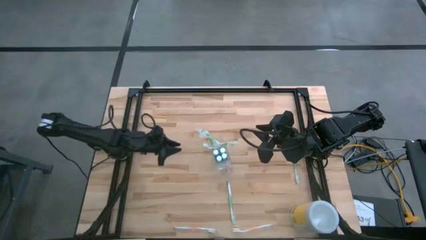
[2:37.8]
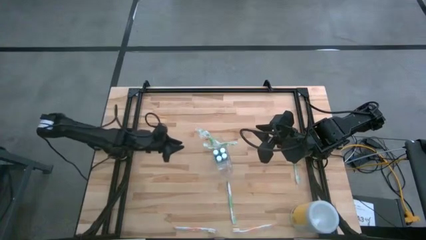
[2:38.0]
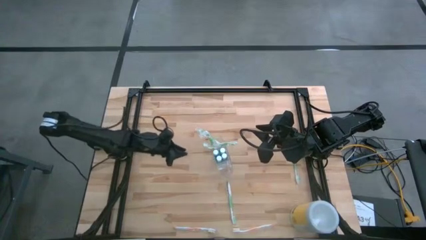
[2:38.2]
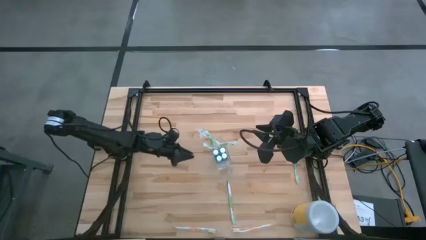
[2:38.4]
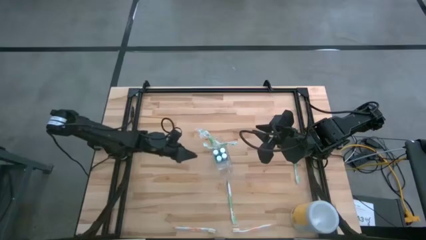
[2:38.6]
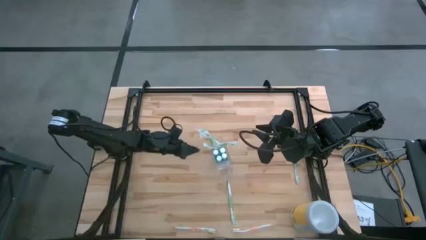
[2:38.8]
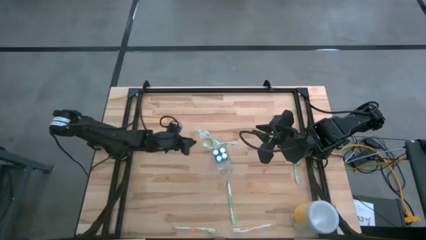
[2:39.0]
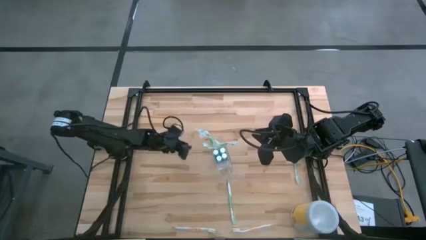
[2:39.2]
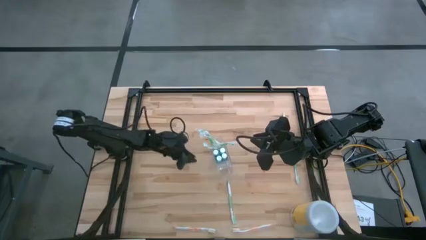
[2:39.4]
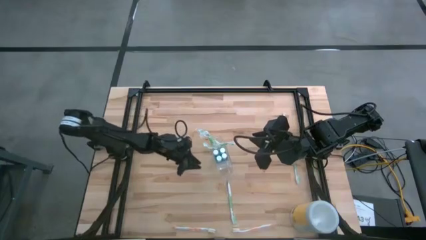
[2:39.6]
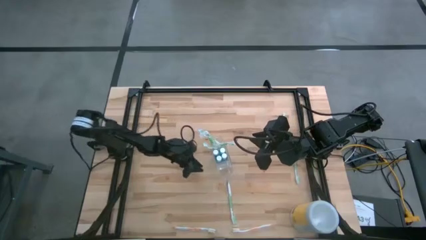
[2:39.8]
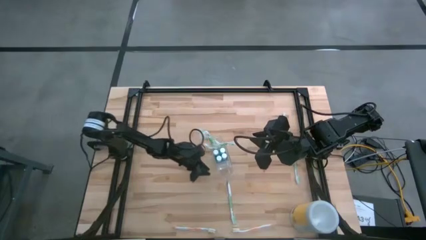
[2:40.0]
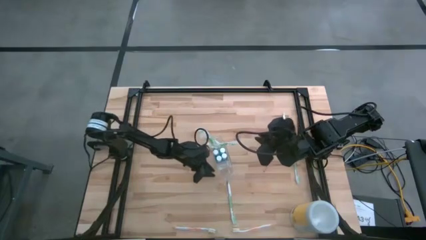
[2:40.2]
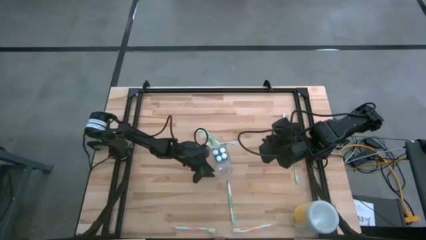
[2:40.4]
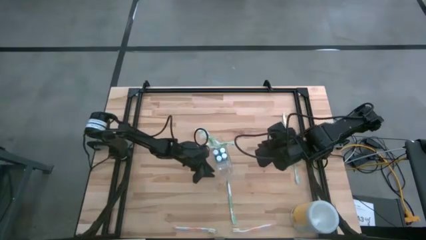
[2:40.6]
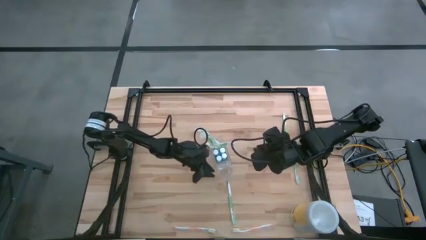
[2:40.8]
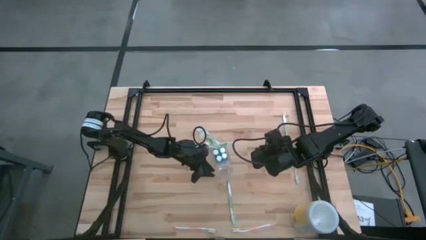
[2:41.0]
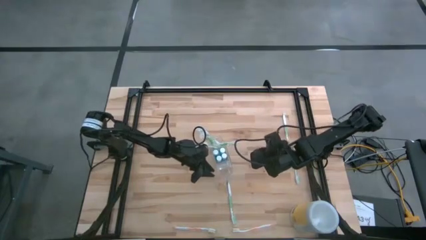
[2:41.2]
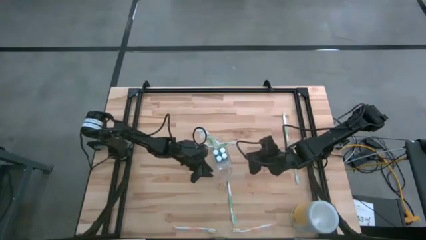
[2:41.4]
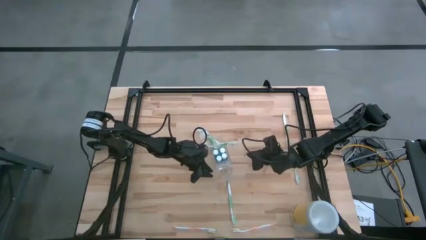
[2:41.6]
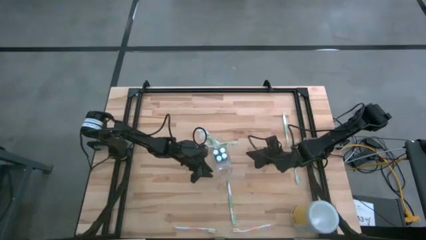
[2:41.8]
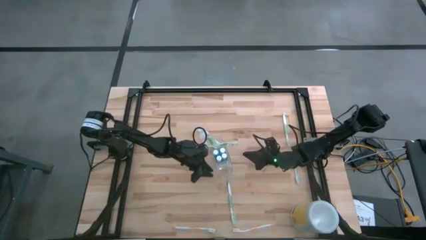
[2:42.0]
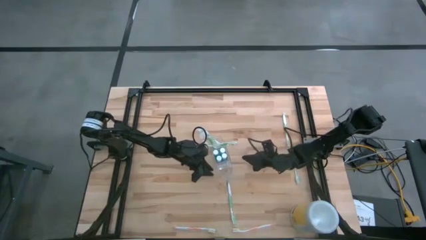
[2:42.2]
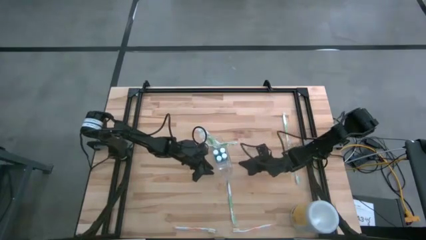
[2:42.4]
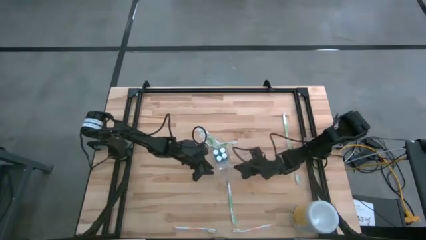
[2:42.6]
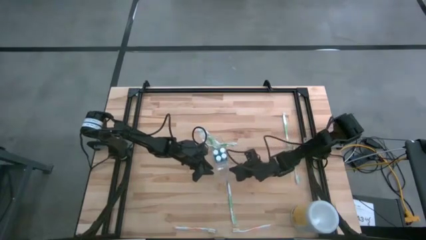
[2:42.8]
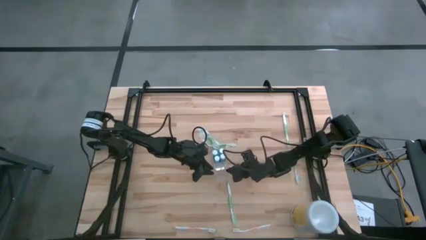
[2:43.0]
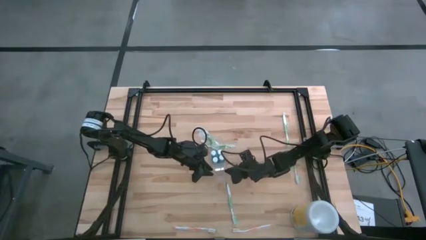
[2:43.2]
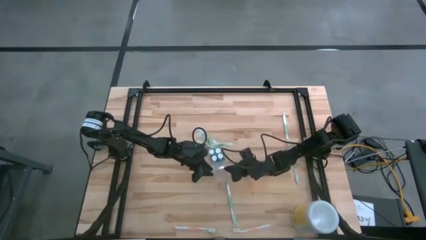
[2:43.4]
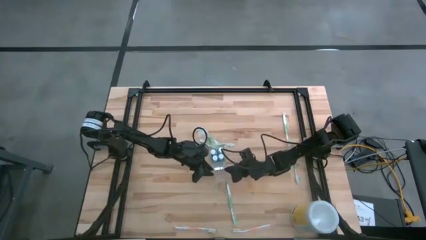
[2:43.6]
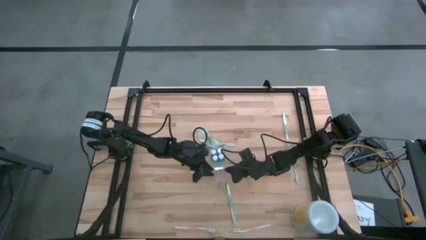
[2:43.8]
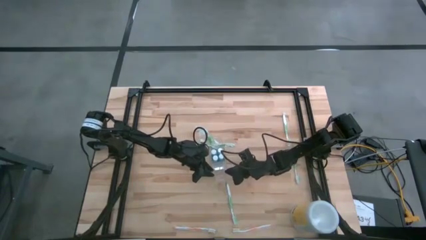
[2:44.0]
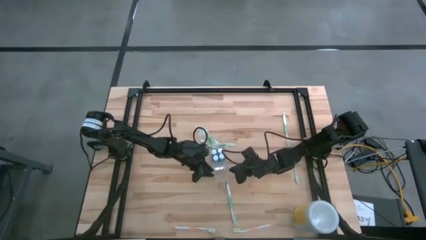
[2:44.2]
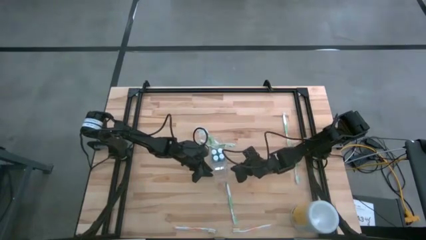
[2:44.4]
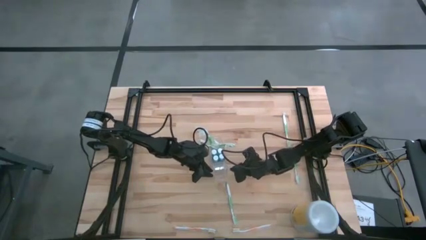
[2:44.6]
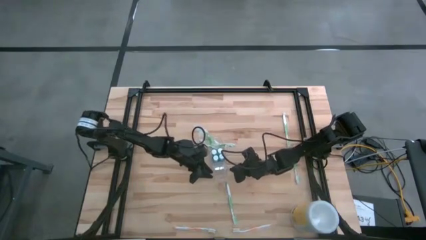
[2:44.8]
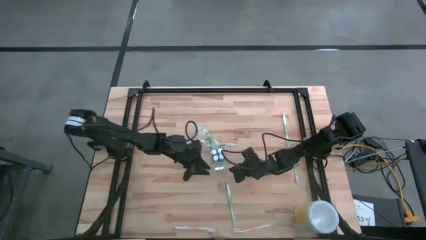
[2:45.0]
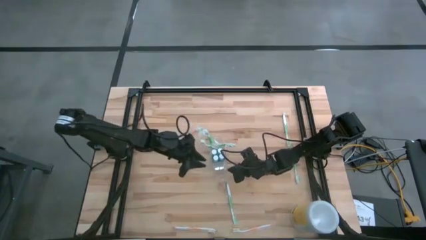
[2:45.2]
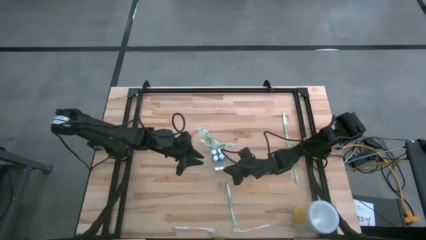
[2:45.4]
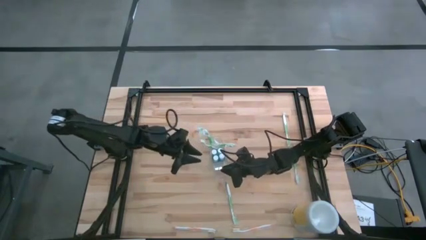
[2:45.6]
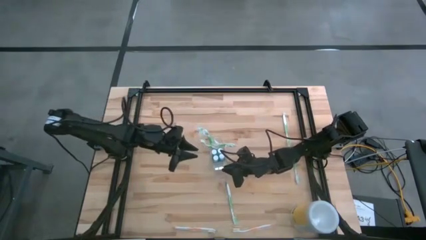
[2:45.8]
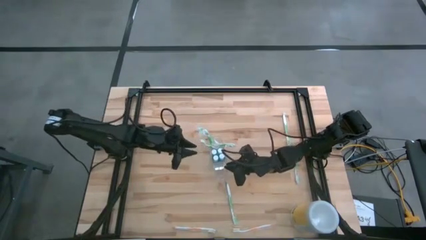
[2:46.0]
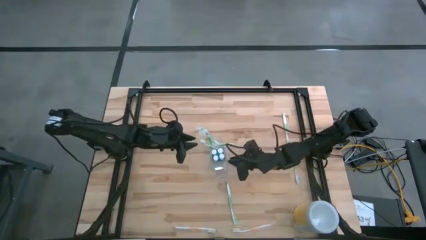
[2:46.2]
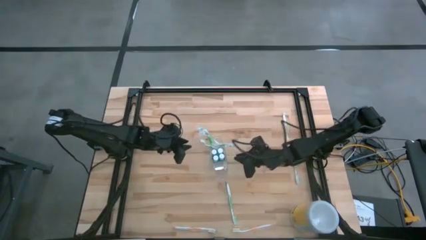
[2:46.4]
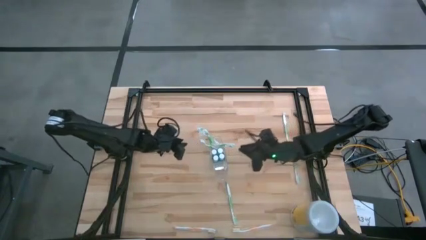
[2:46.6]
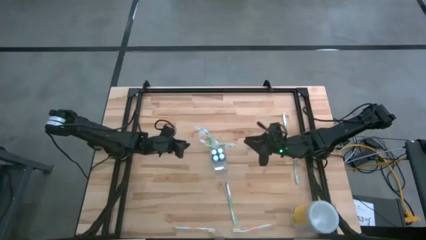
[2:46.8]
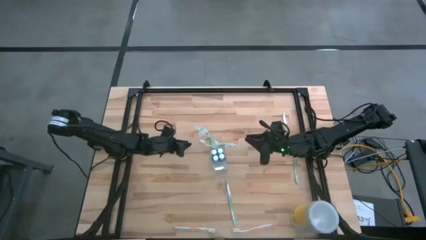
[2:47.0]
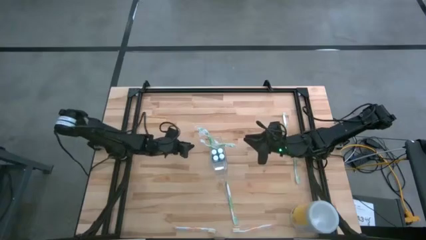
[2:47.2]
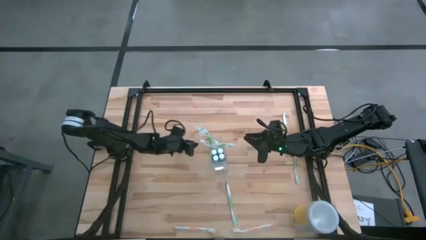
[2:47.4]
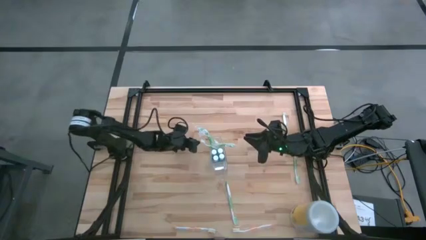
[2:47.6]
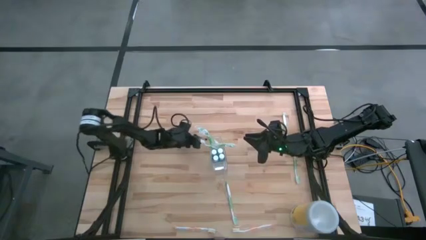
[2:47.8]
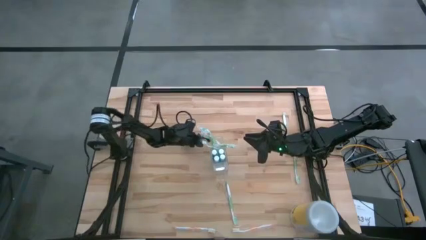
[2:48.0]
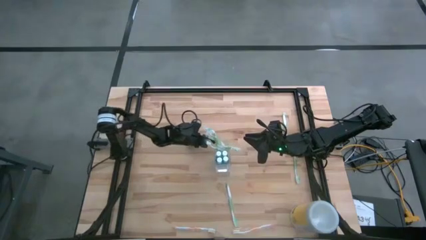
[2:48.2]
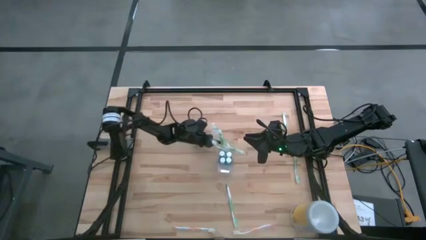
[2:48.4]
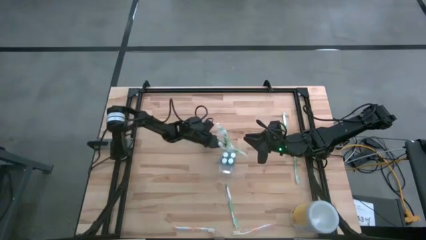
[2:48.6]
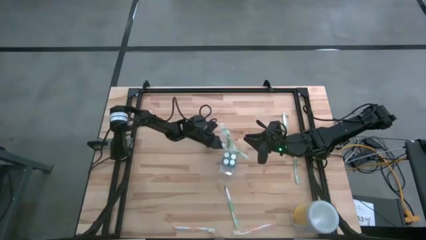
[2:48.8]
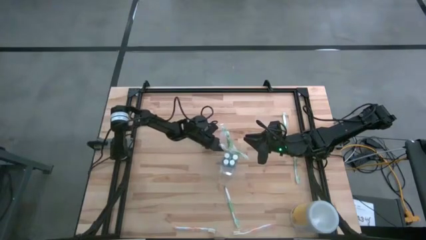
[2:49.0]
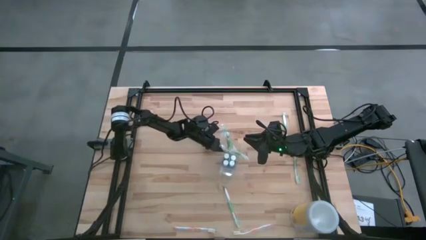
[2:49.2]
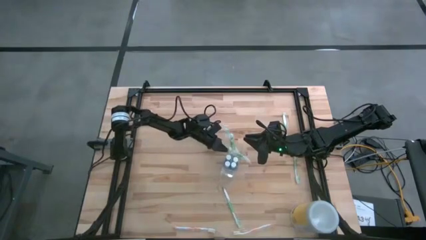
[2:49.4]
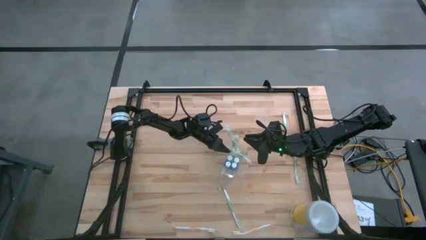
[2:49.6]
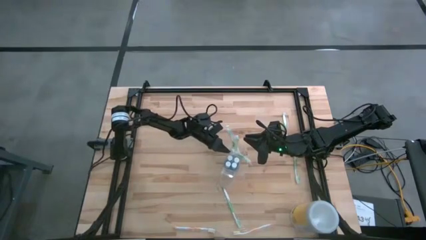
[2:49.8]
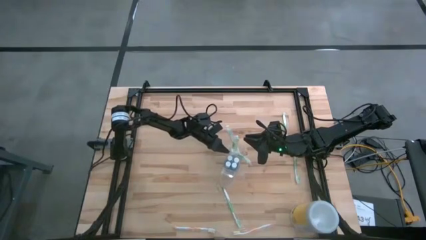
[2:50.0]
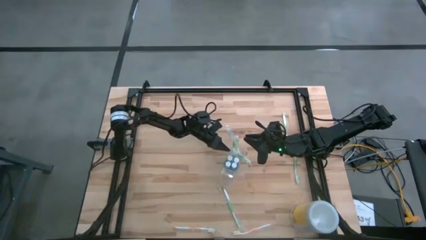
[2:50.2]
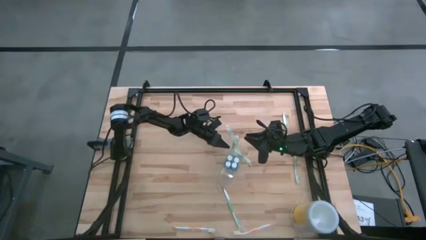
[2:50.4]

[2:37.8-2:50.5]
Task: Pick & Place toothbrushing station
Adjust the transparent organizer

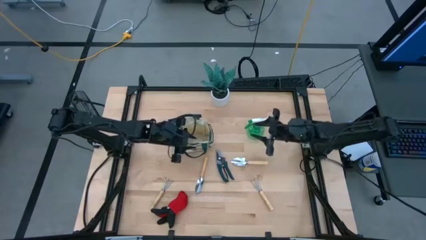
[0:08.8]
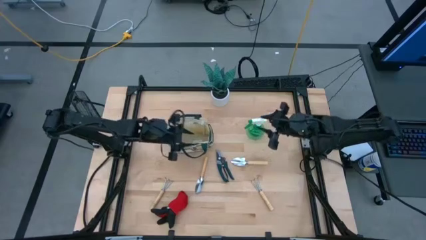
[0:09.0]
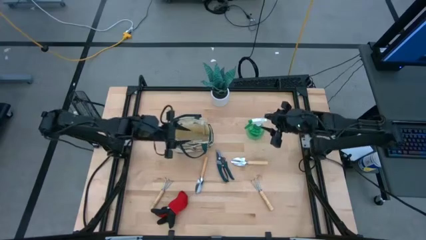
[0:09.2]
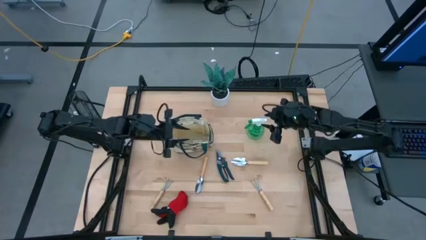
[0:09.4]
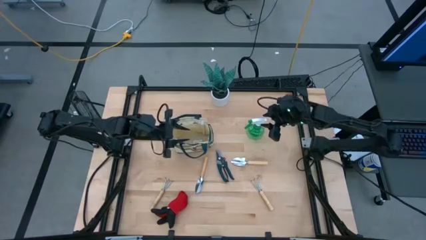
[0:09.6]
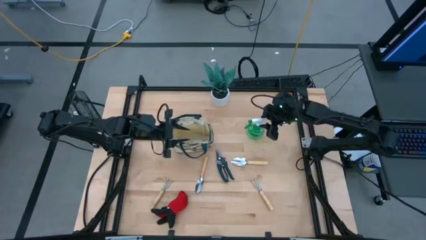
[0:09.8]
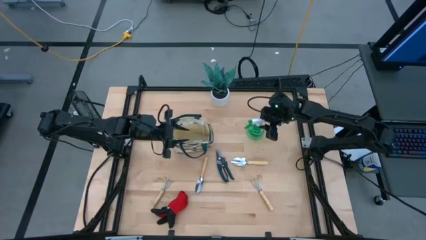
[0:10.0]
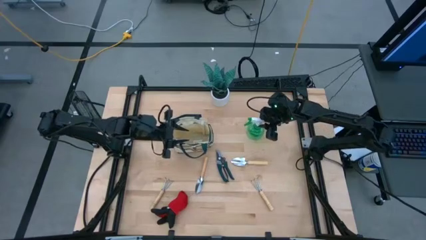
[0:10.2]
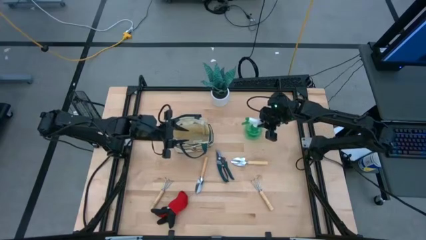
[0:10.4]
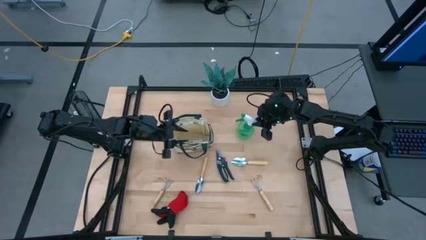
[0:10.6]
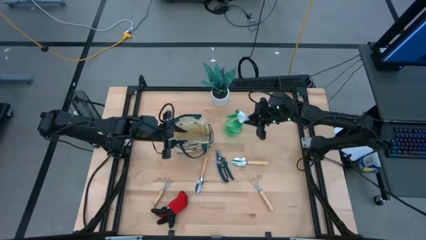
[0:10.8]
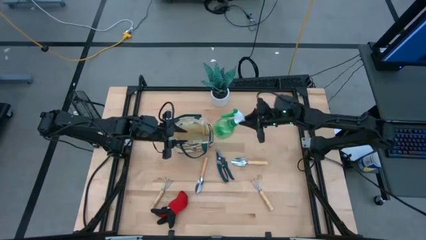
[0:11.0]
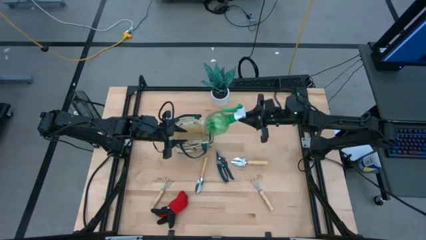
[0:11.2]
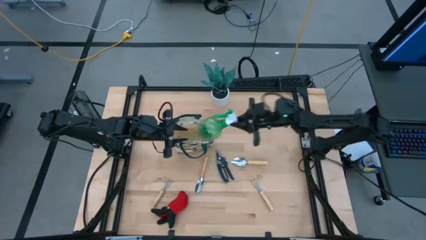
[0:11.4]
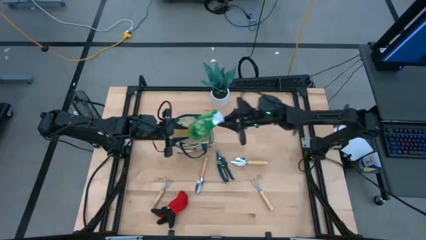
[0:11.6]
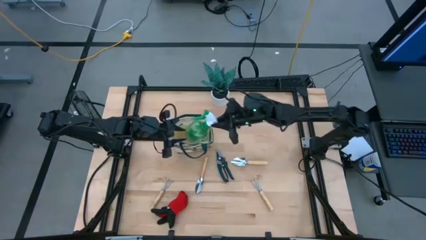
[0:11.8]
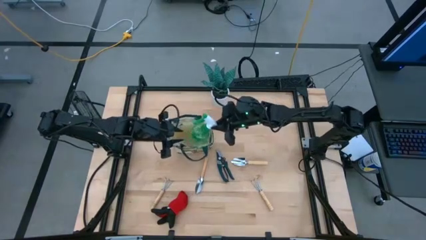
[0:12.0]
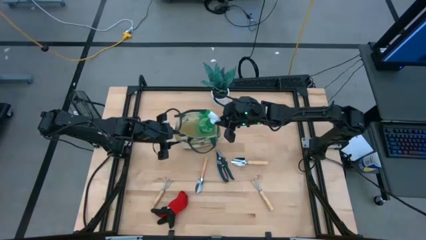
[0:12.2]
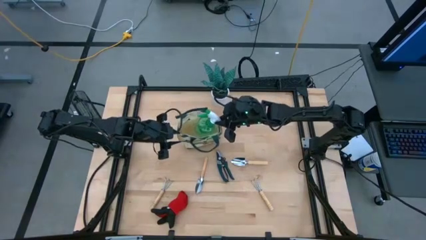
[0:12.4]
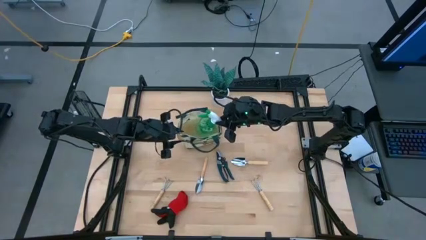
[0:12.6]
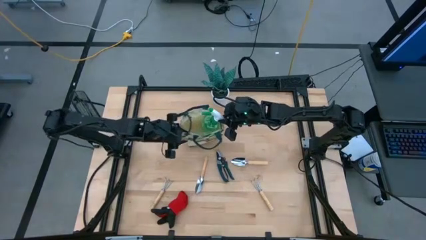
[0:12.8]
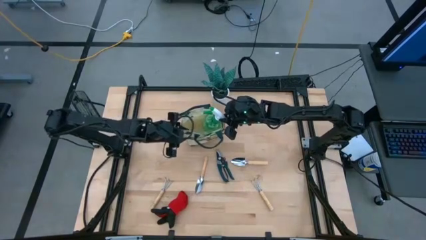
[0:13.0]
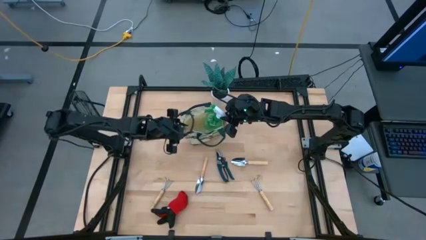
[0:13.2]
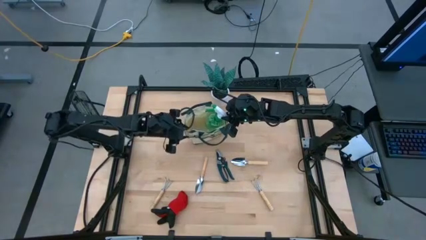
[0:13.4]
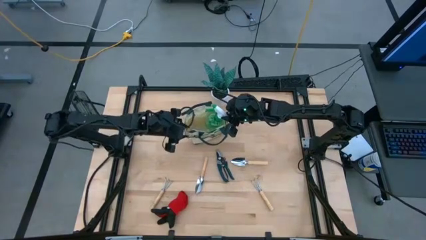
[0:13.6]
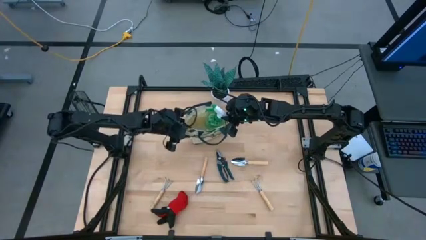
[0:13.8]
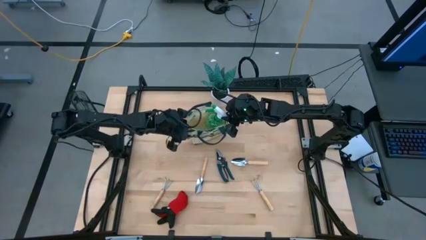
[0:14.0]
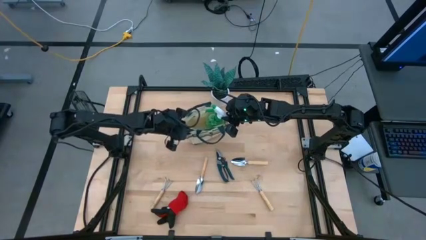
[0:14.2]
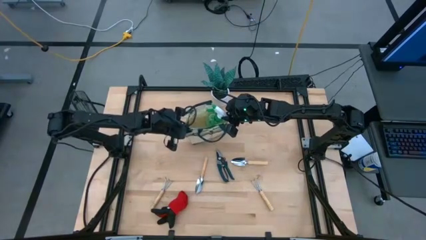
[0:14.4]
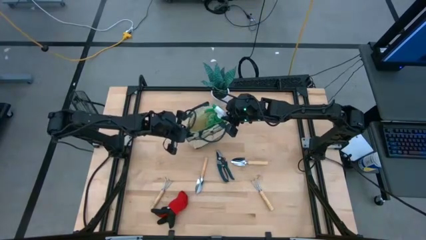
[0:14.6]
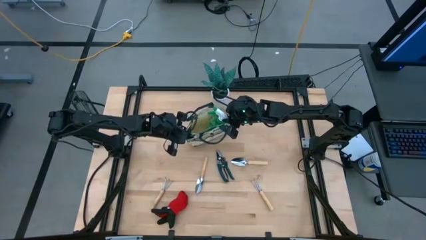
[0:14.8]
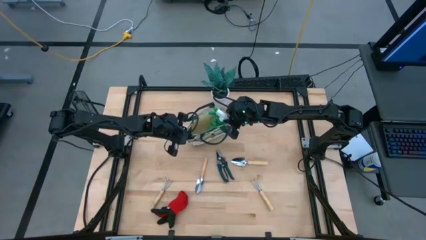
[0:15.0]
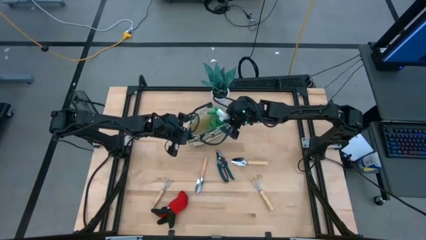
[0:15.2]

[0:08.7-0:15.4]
Task: Pick & Place Garden tools in Gardening bag
Put the green spray bottle into the brown gardening bag
